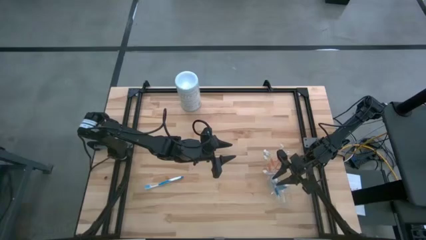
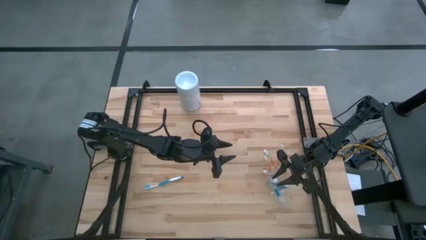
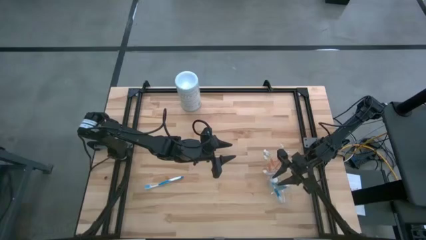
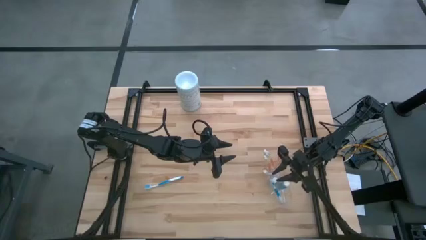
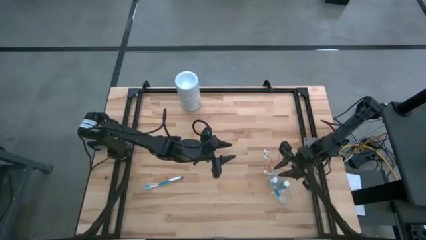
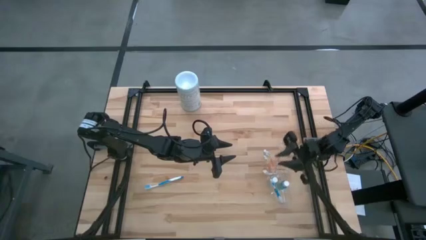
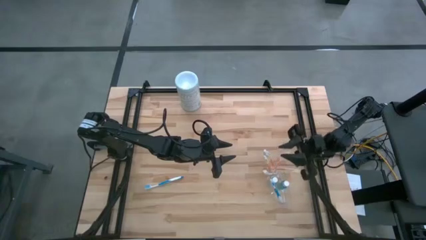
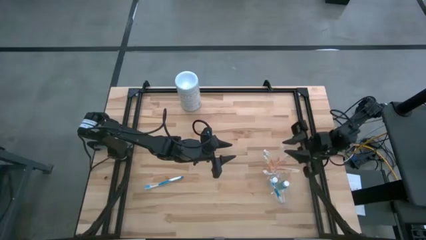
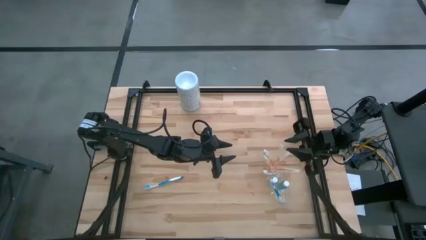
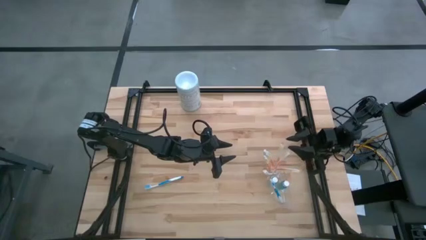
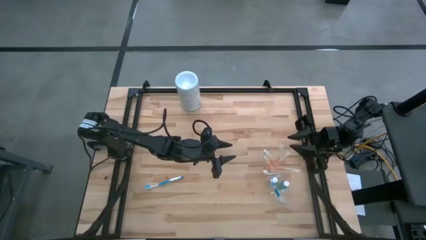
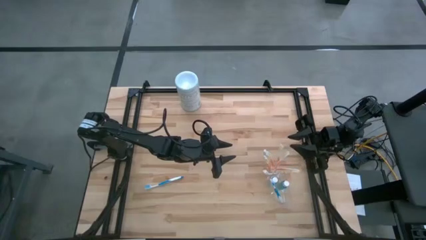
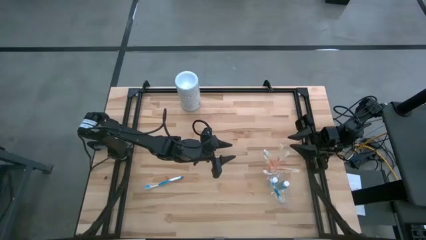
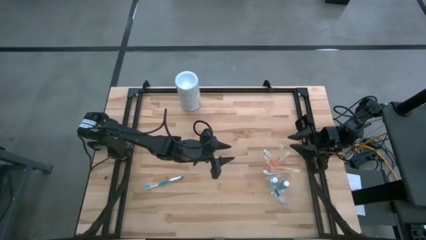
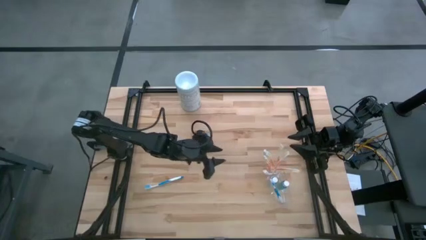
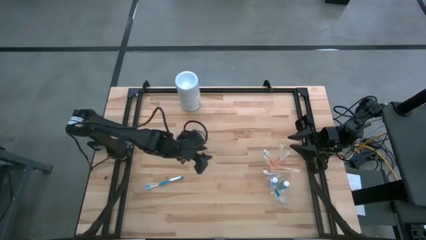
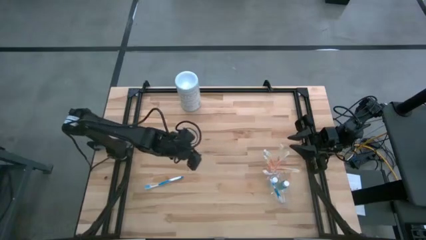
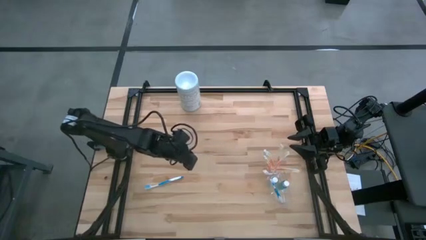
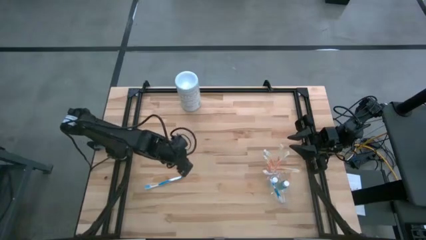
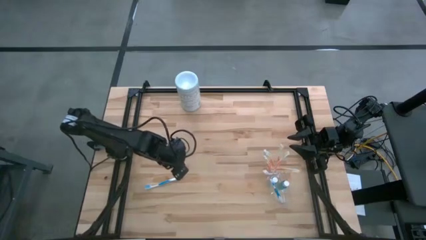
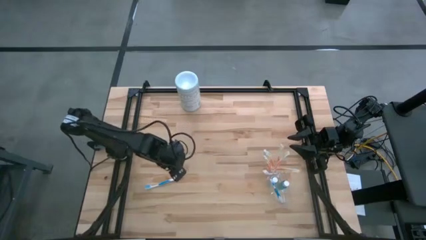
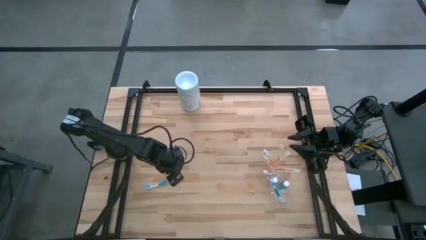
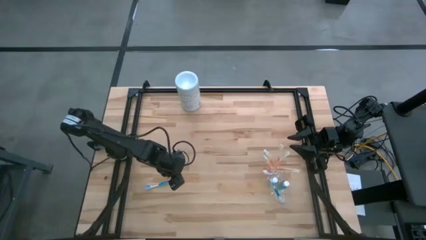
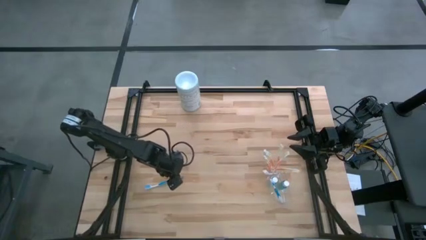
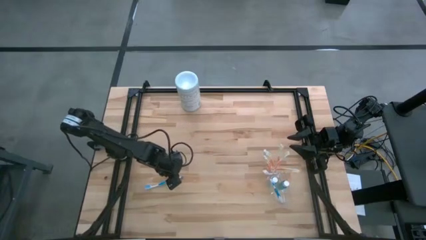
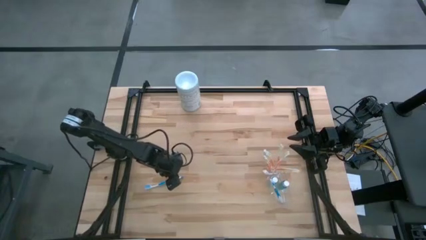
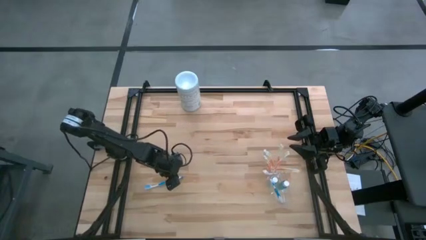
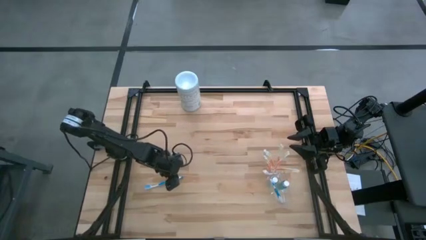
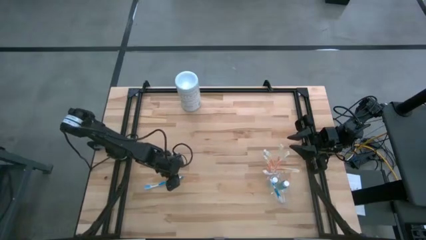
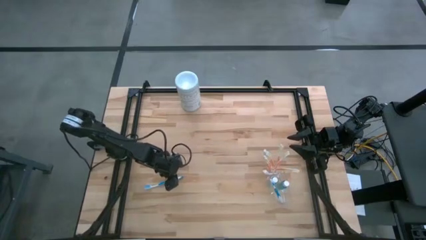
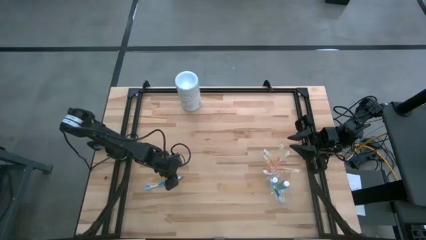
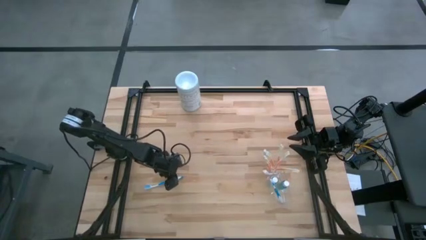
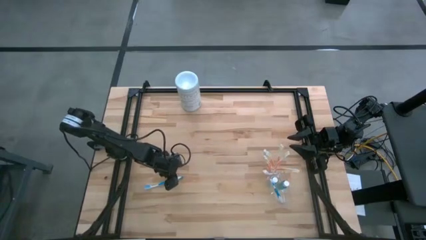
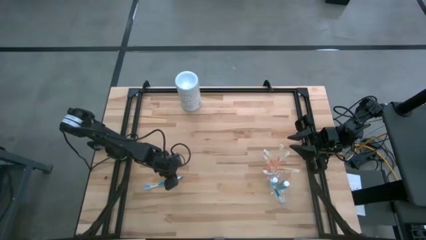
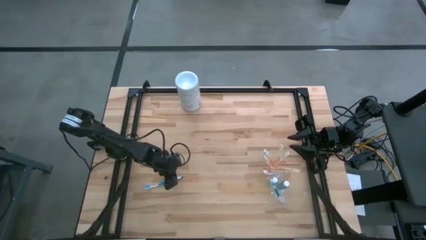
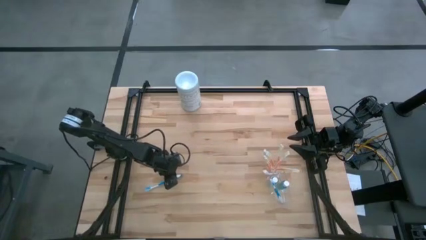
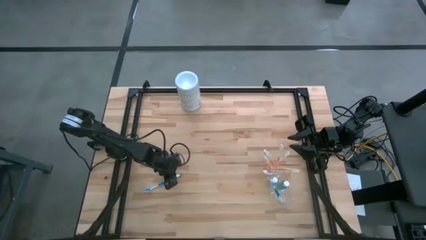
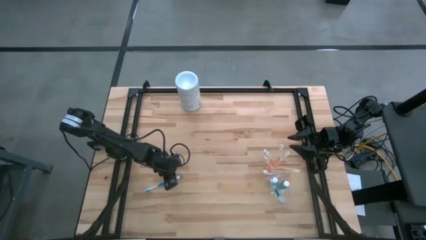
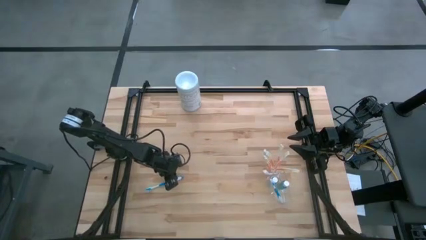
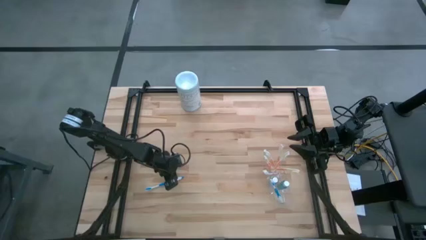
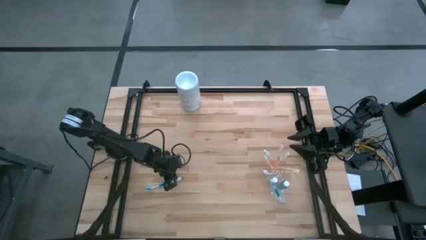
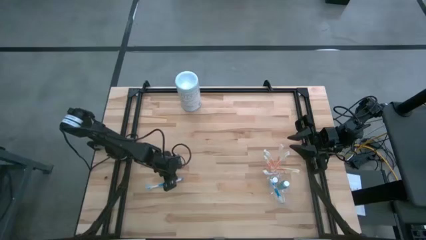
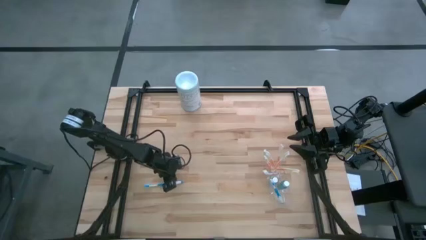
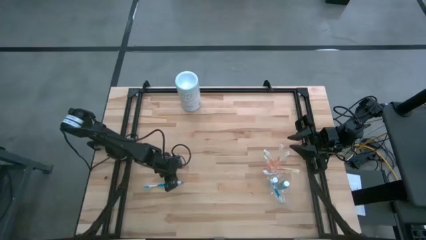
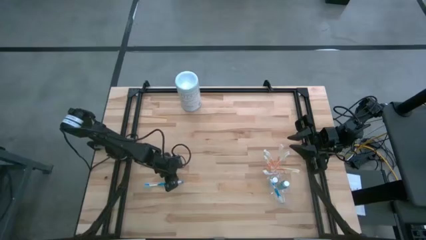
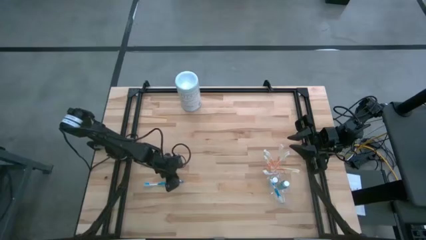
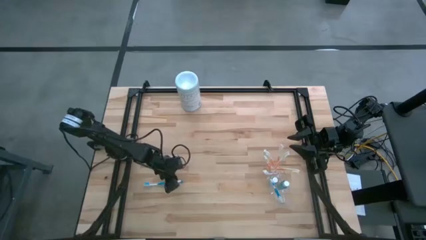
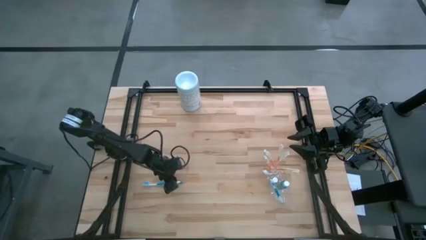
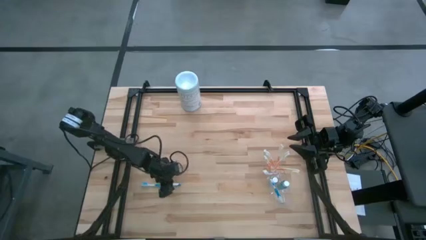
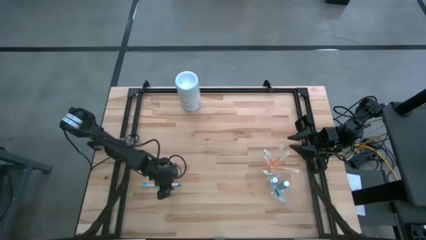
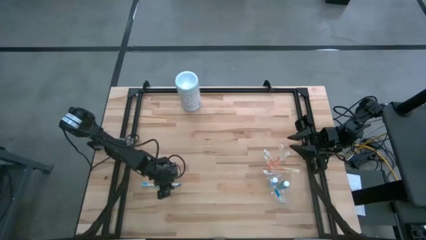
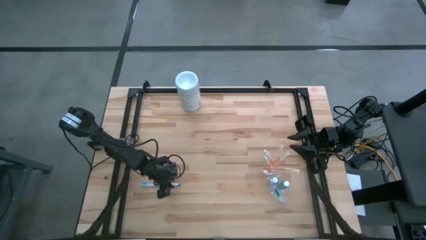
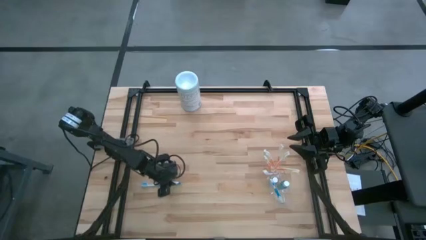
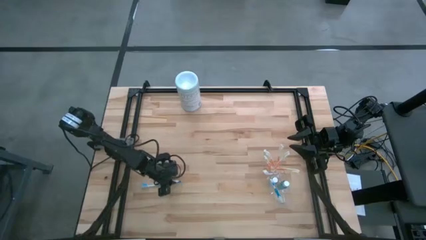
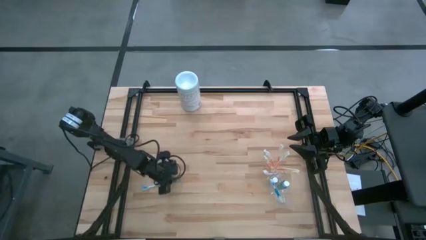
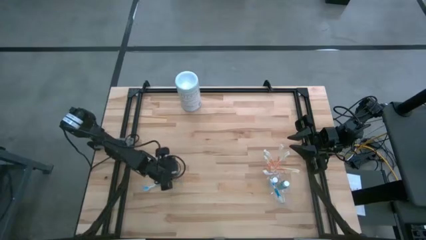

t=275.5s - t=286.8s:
Task: Pick & Place toothbrushing station
Put the blue toothbrush into the bottom section of the transparent organizer

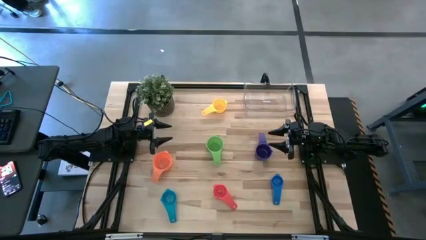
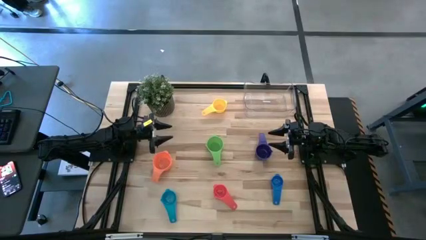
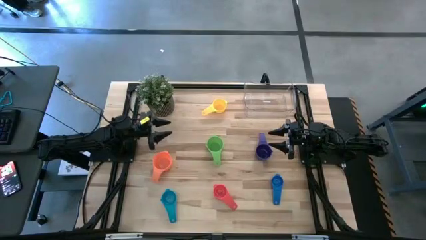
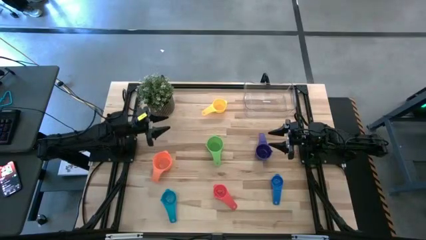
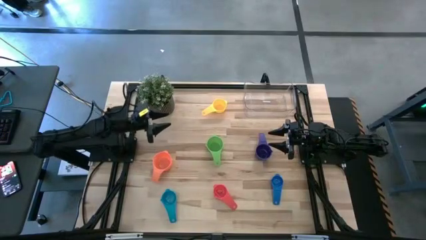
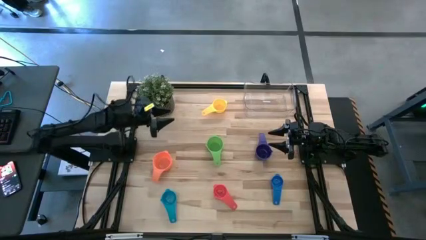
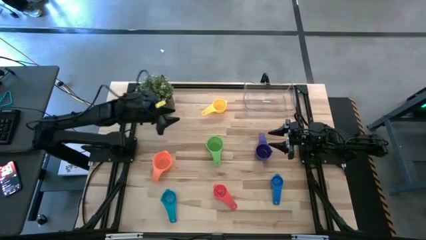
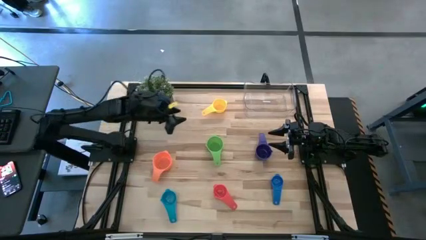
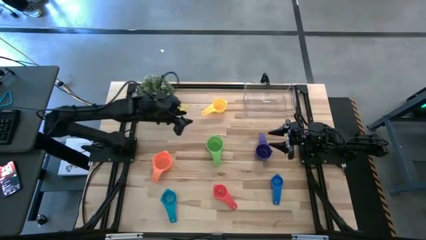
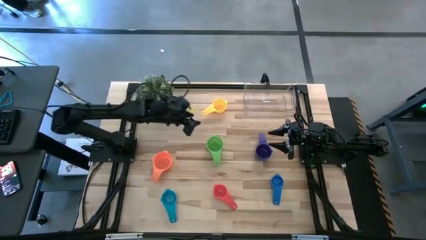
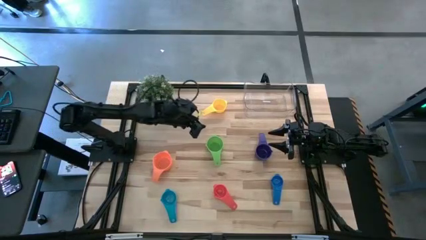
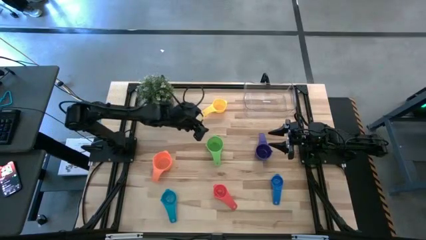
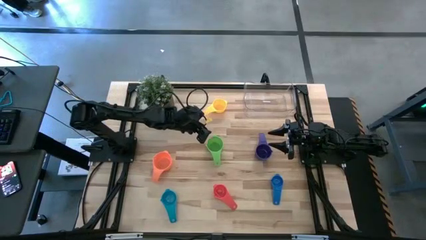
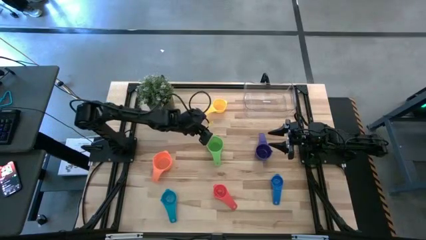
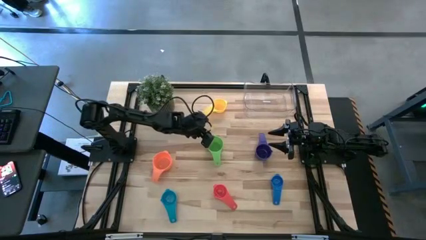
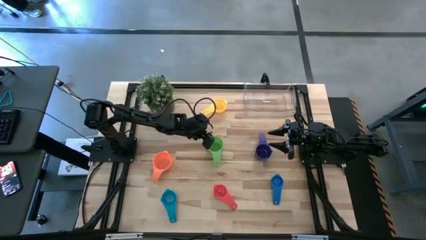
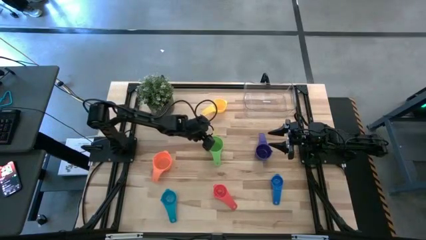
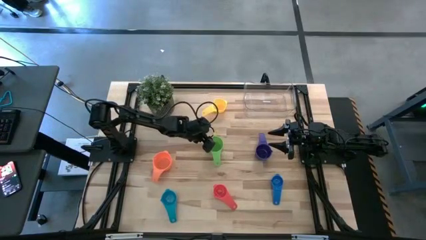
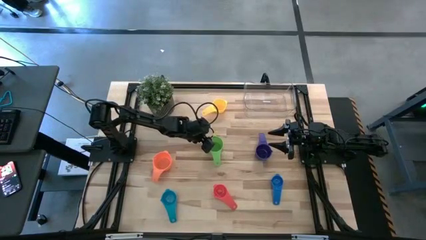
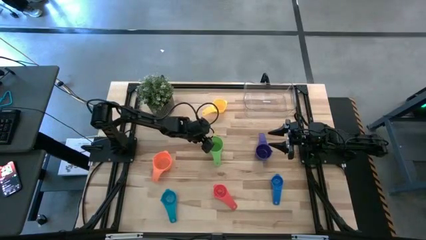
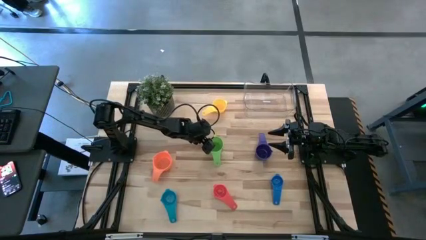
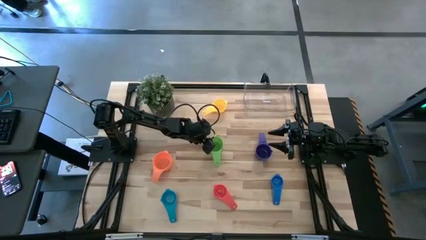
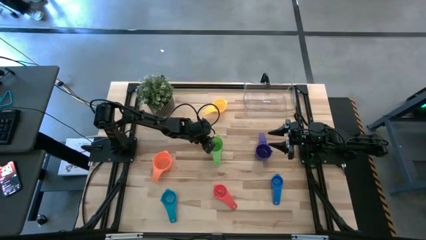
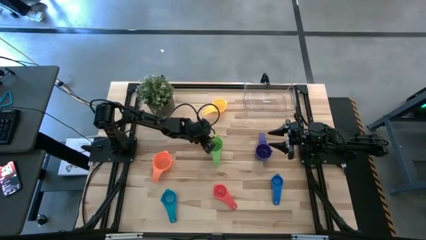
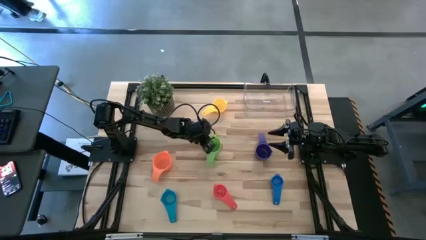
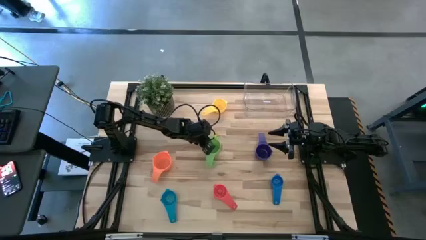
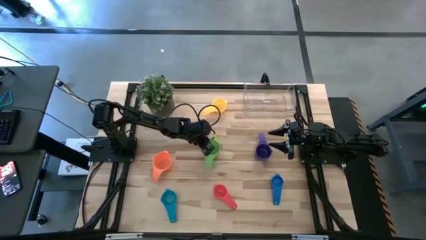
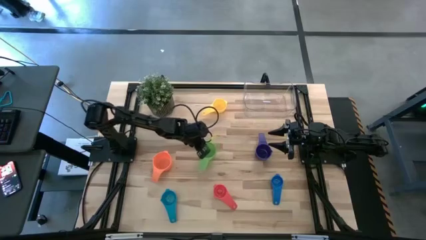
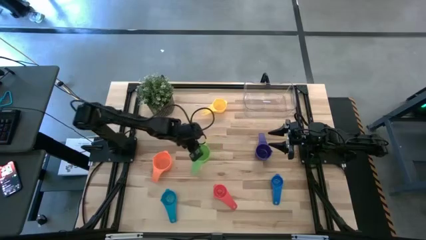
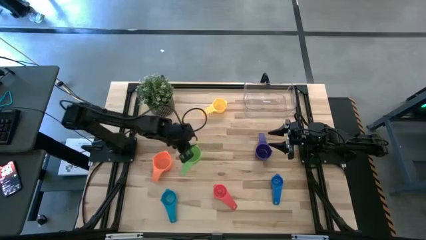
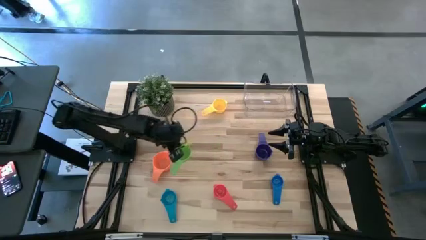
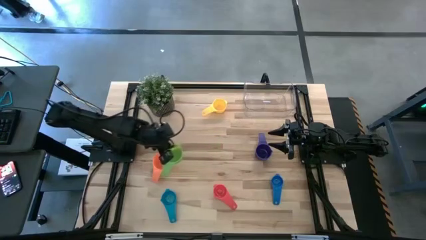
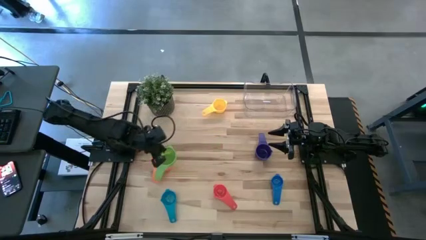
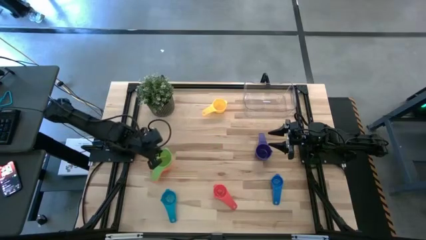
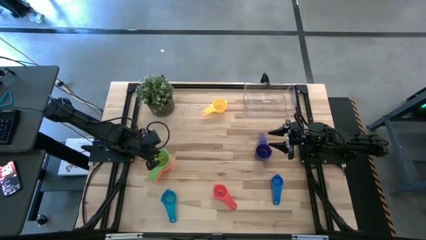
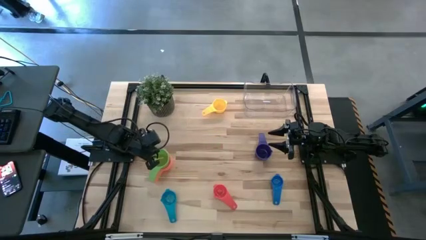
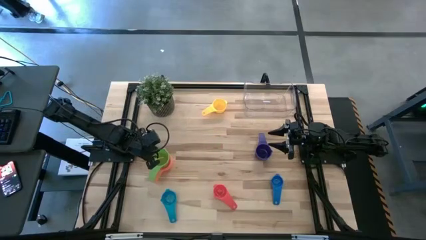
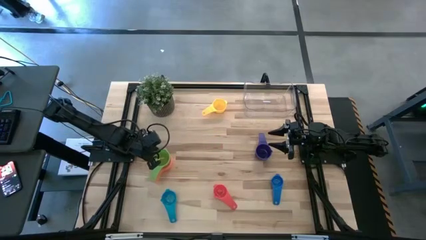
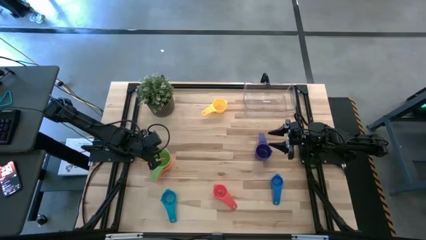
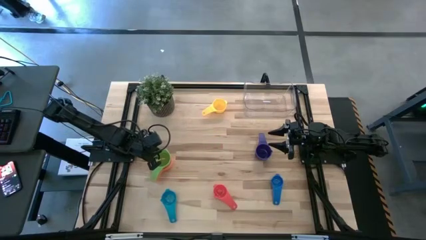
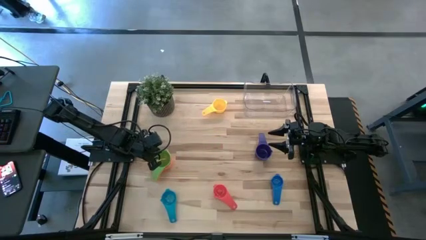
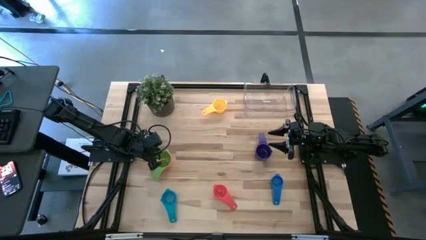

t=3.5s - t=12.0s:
Task: Nest measuring cups in basket
Stack the green measuring cup on top of the orange measuring cup
